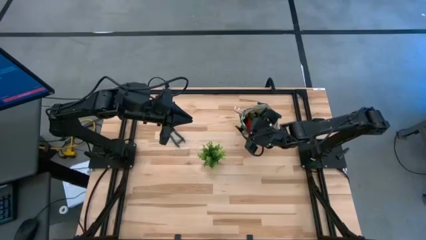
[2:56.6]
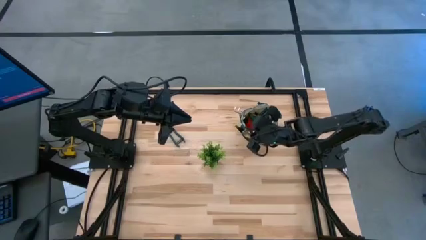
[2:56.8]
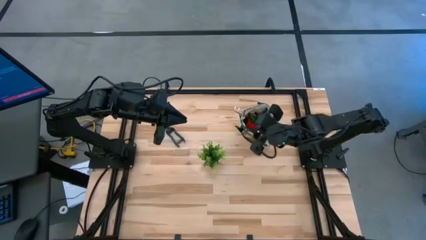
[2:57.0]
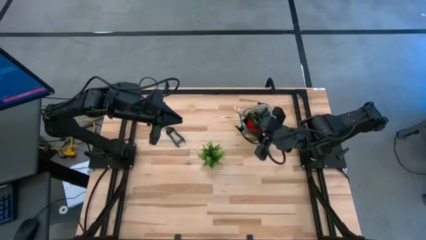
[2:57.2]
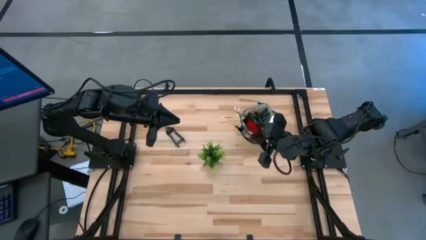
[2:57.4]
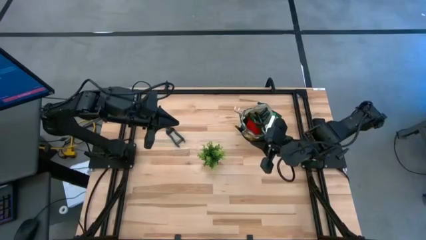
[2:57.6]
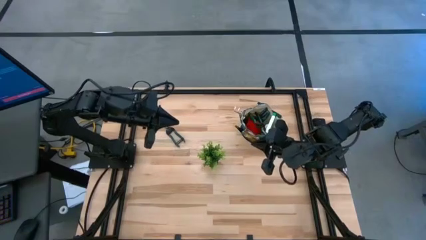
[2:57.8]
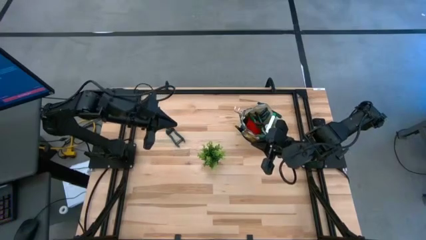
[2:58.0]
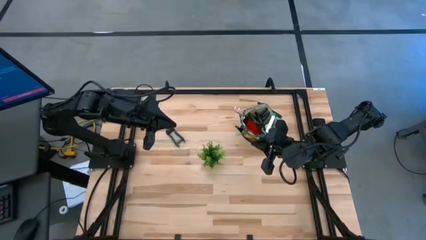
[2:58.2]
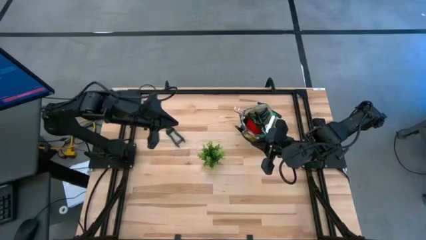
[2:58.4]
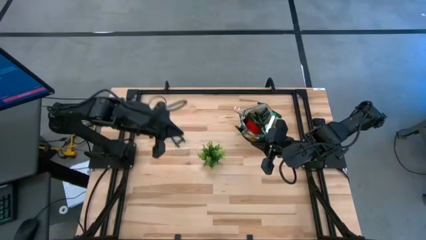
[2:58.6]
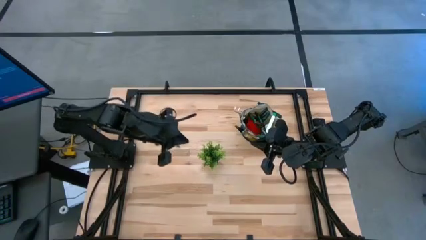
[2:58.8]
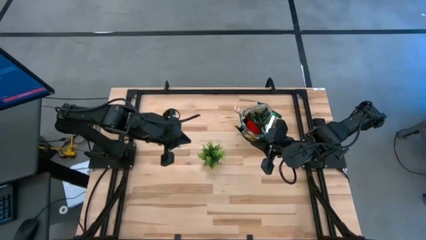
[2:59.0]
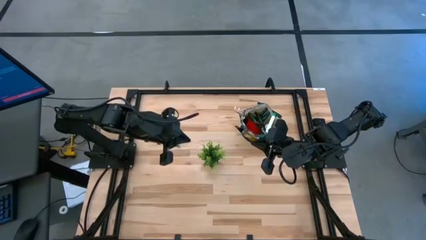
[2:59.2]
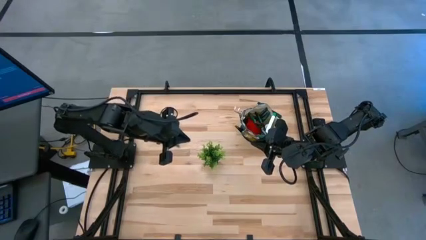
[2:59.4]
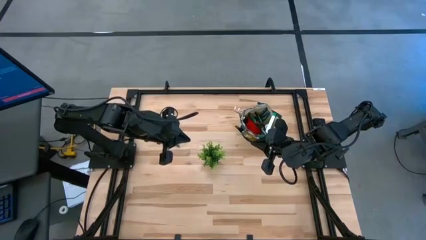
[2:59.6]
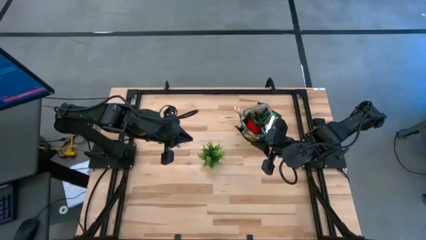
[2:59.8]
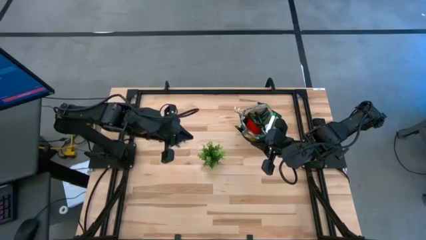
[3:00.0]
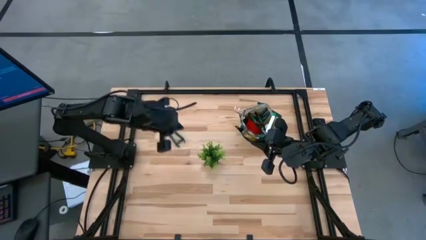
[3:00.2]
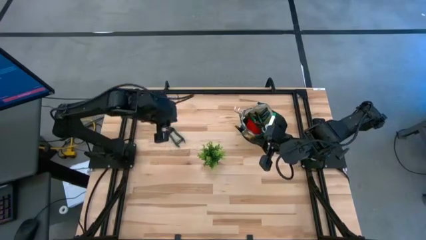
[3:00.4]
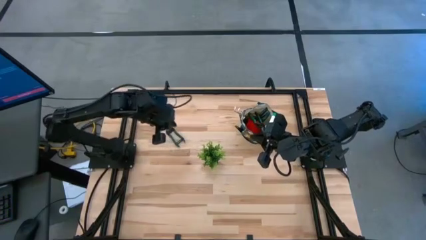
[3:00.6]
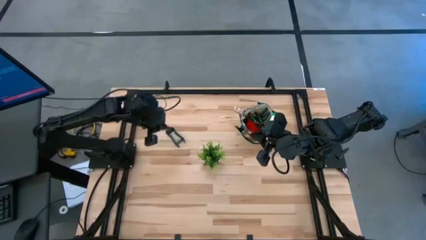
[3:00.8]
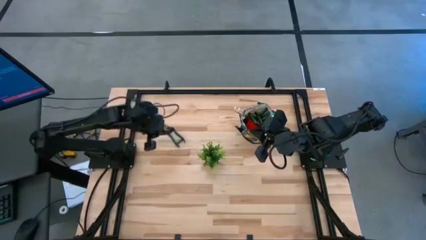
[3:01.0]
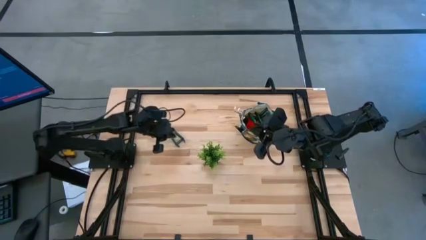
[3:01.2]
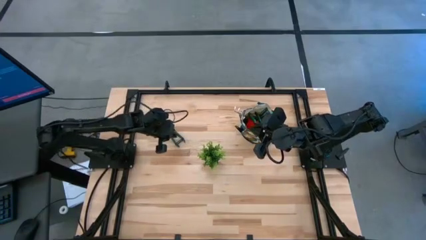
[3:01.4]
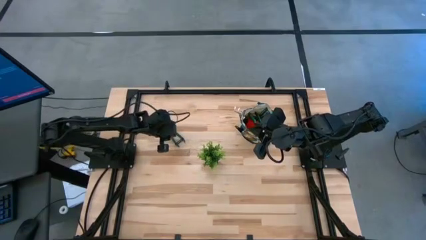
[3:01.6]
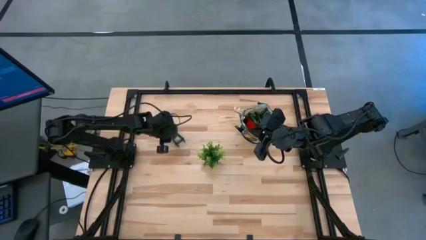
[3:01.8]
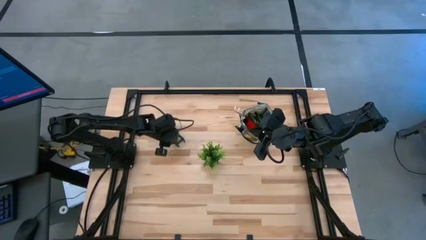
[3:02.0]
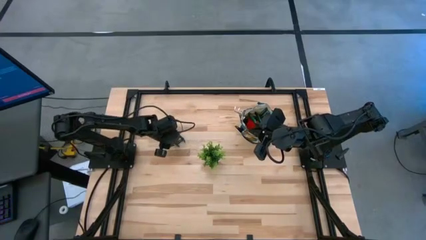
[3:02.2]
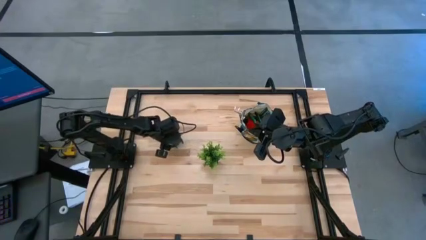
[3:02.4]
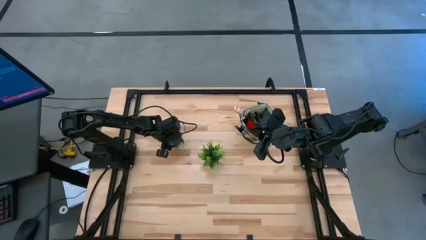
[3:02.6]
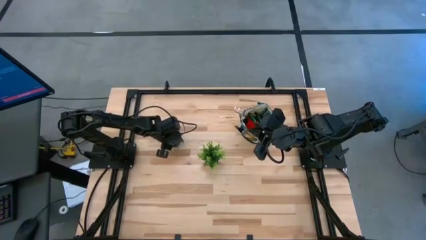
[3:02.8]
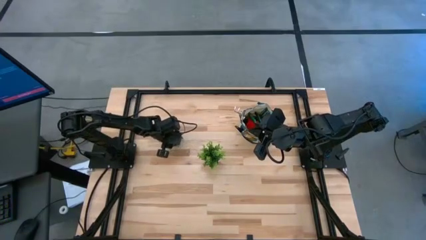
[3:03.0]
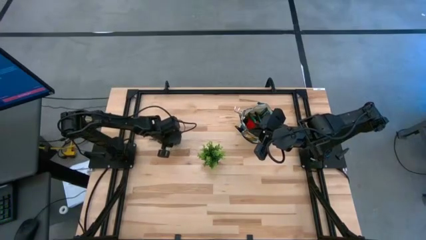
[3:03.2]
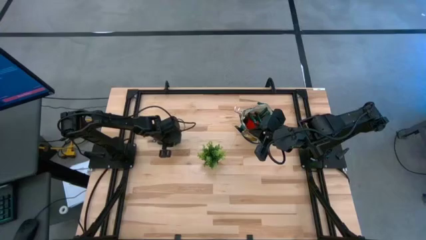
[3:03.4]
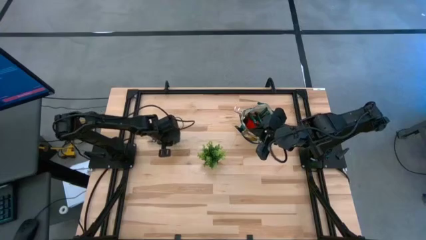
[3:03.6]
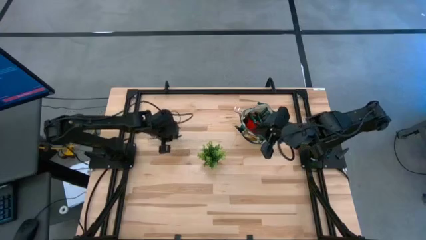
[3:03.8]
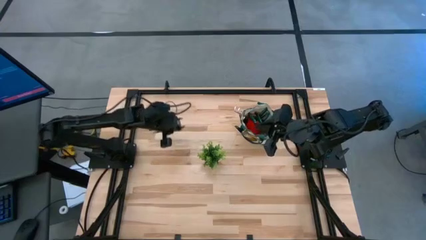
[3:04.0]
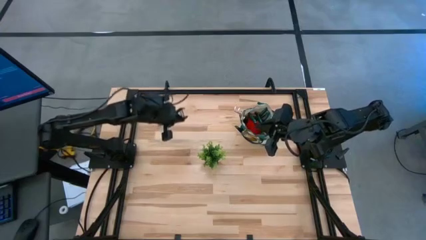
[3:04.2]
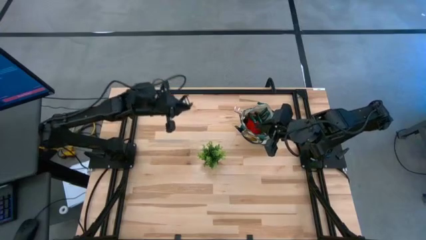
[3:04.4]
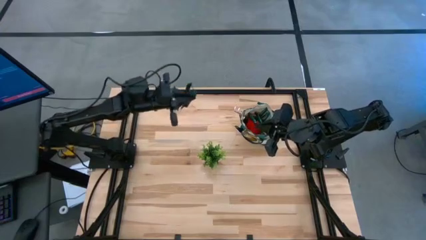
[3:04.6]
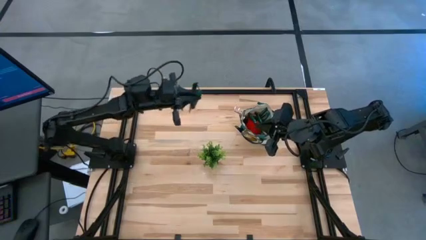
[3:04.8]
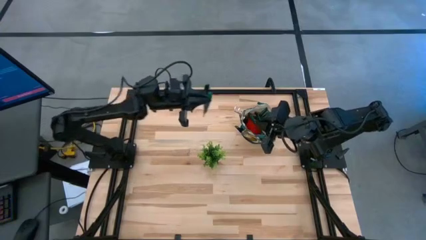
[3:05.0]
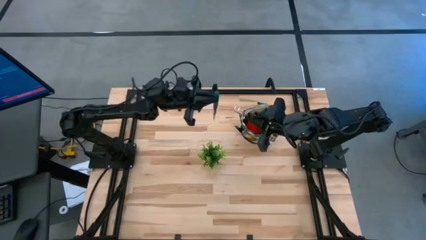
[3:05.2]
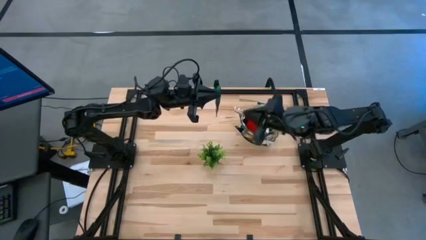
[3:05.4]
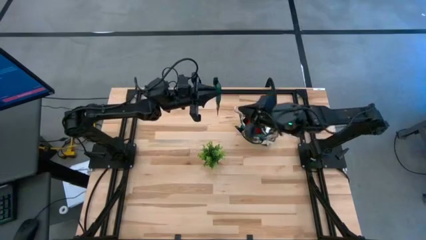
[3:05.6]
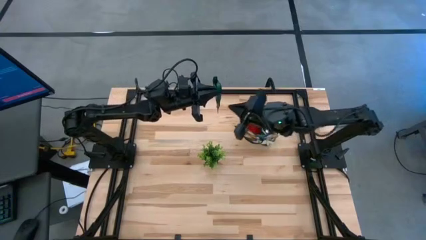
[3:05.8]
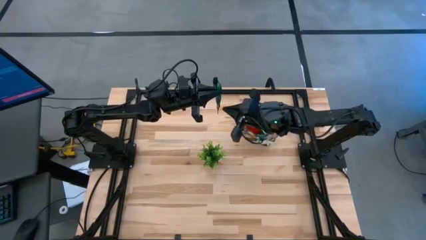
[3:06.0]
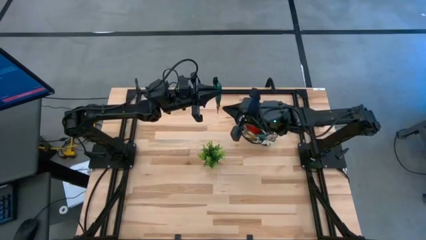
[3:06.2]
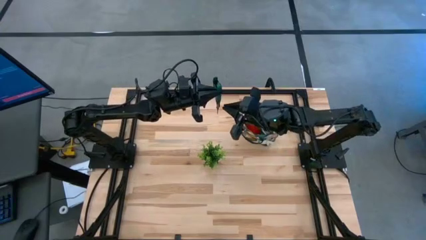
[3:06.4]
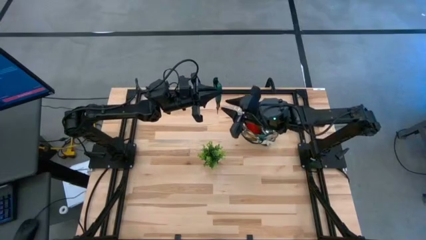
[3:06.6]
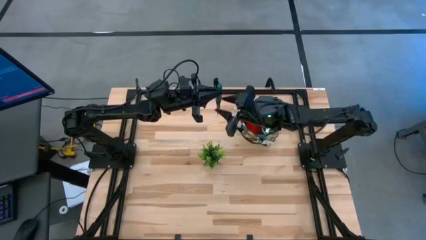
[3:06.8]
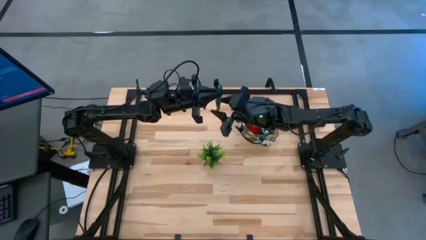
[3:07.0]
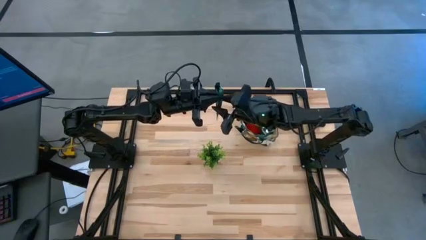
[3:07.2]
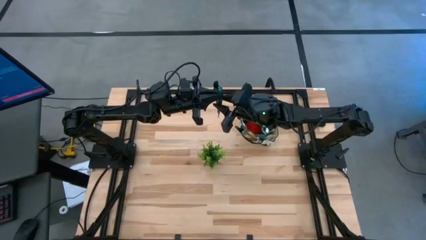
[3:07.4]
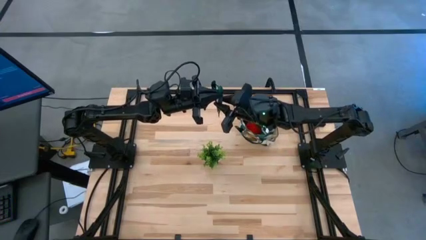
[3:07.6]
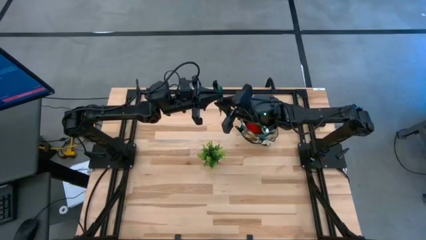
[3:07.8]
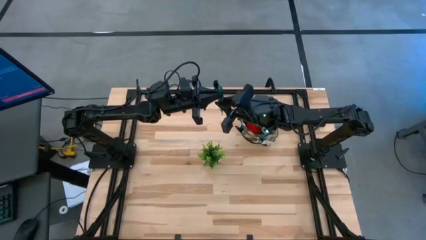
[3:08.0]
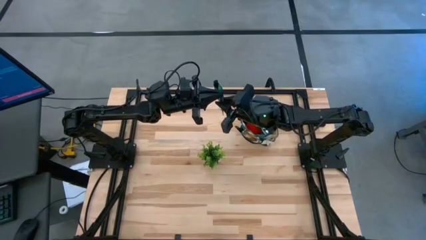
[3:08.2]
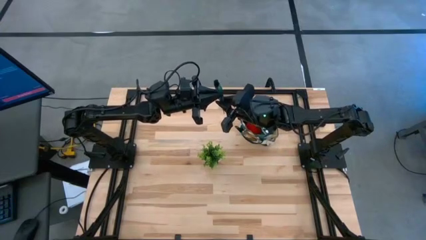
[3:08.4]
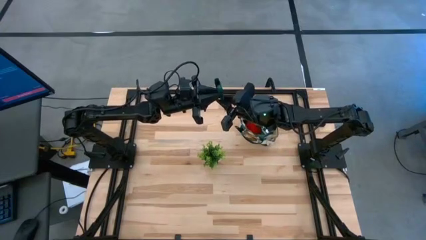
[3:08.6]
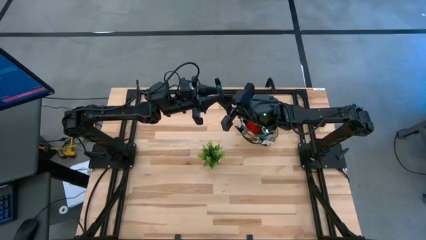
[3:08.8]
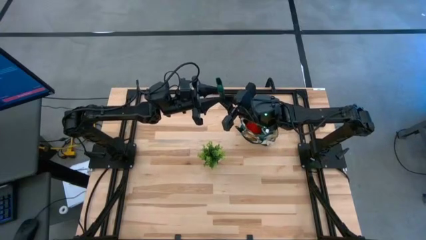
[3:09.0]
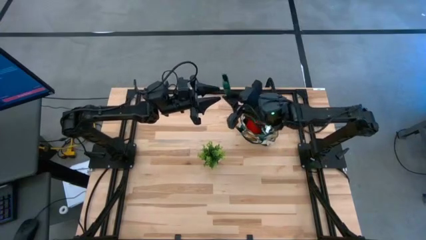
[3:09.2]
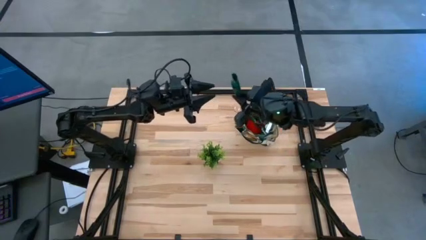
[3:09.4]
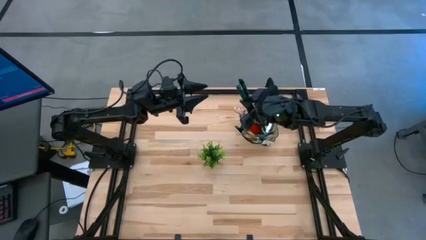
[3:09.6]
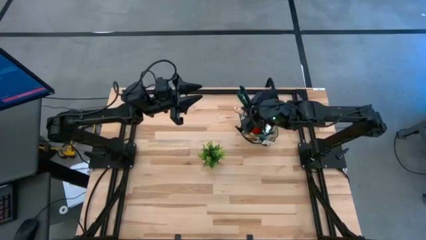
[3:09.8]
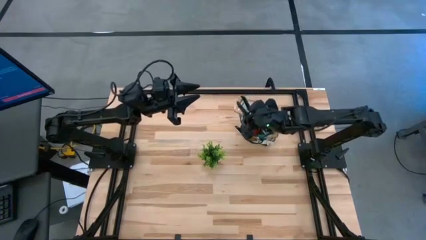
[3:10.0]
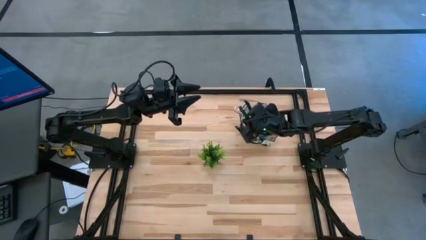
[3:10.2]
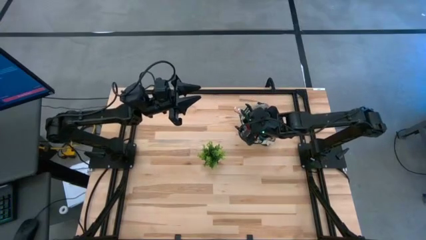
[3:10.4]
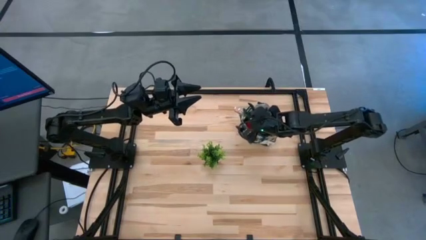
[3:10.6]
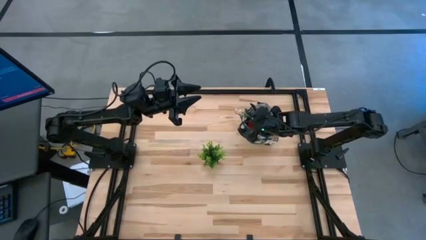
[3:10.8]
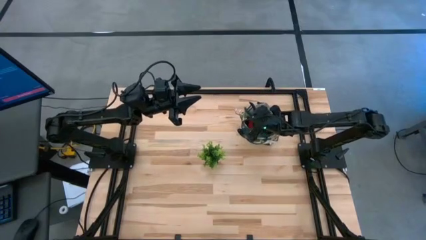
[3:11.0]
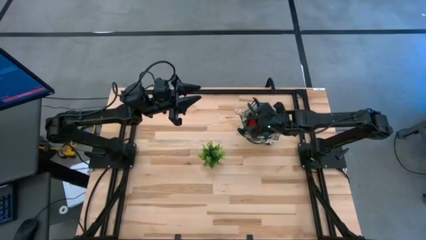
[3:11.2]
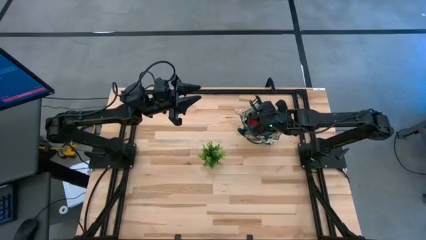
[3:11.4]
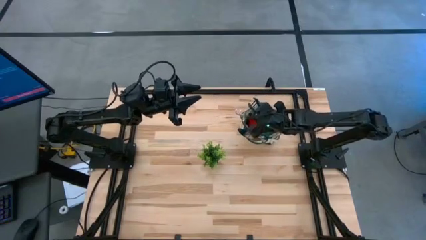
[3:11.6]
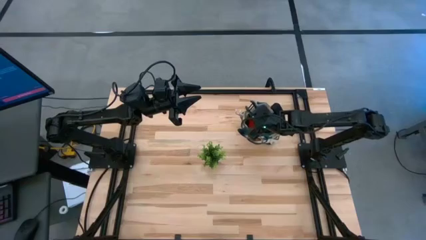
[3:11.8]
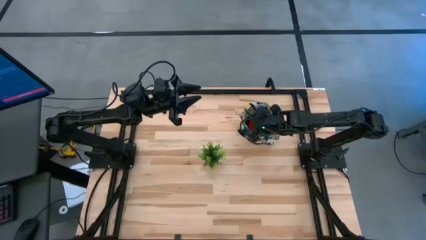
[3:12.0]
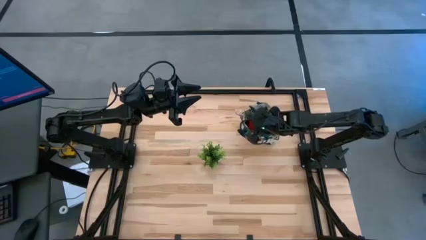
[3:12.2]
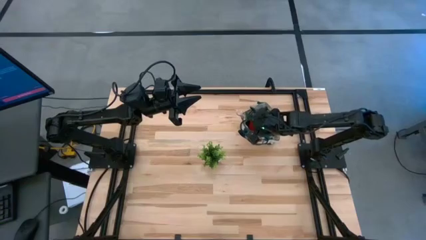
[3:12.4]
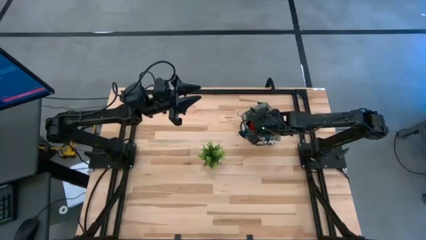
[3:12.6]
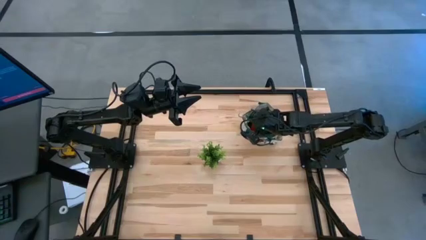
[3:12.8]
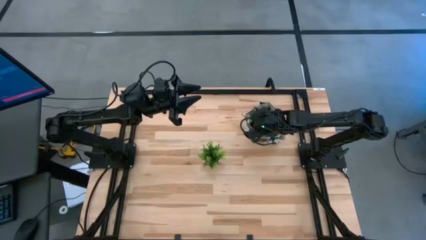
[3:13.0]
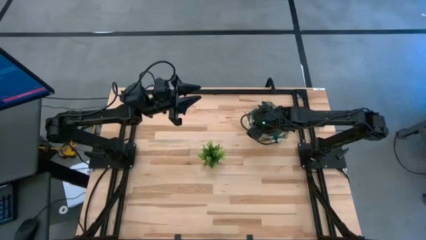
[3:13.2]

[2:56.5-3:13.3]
Task: Pick & Place Garden tools in Gardening bag
Put the green fruit pruner into the brown gardening bag
